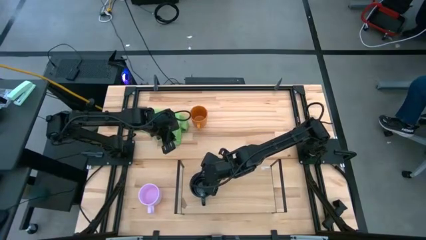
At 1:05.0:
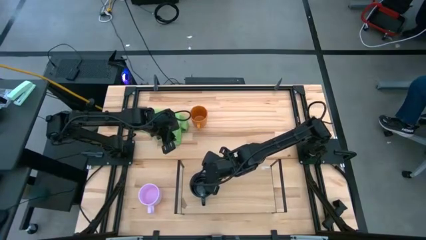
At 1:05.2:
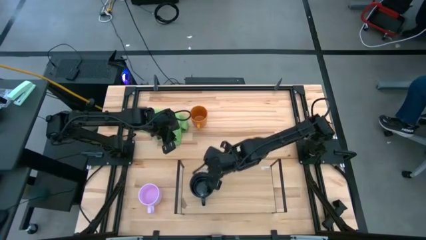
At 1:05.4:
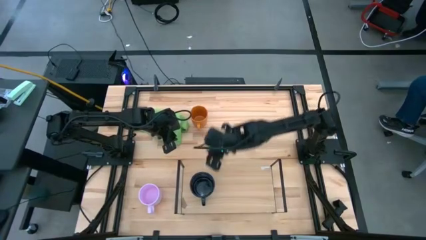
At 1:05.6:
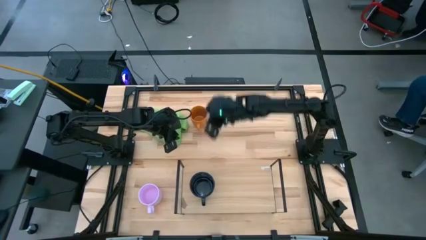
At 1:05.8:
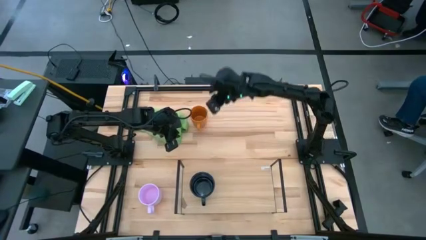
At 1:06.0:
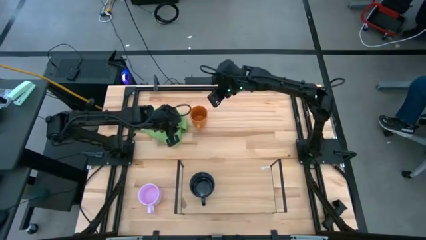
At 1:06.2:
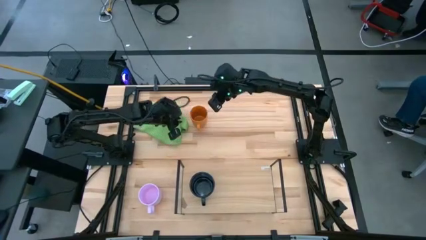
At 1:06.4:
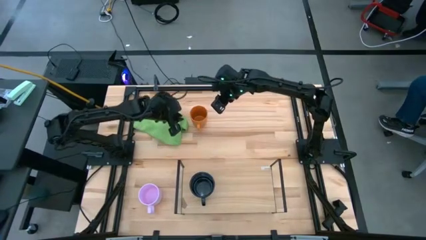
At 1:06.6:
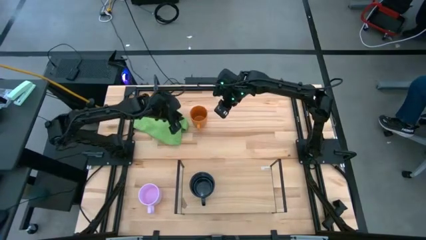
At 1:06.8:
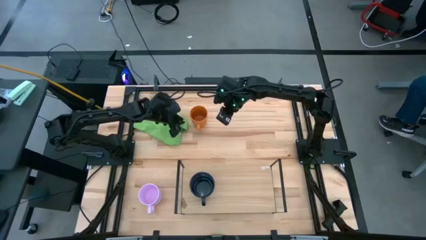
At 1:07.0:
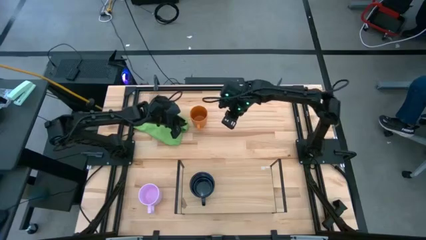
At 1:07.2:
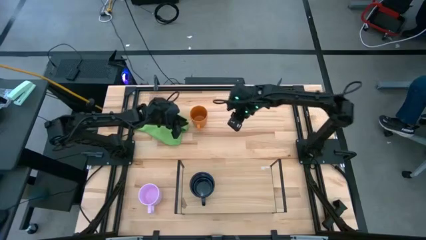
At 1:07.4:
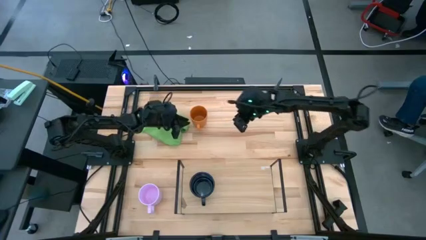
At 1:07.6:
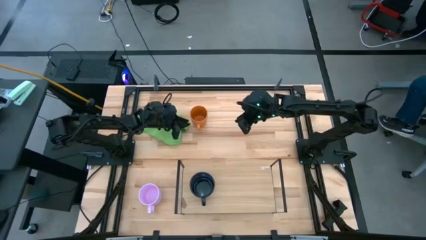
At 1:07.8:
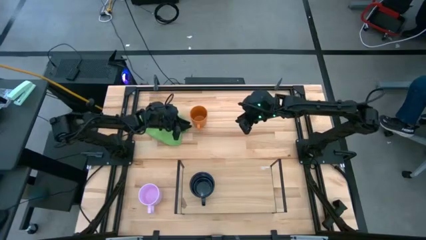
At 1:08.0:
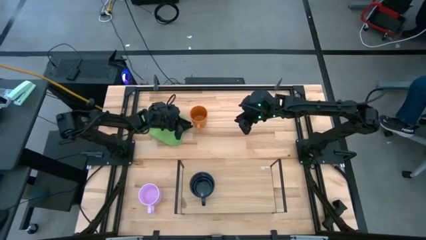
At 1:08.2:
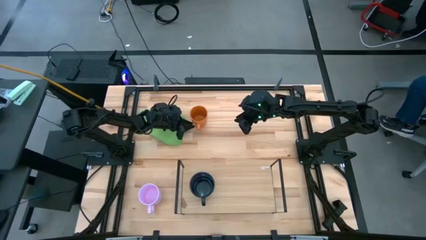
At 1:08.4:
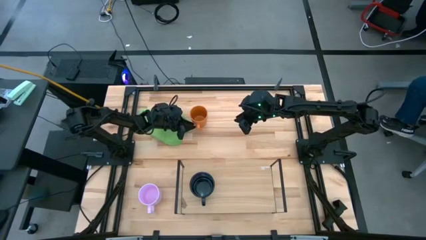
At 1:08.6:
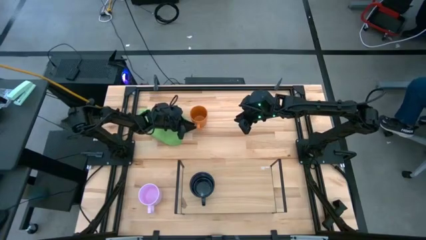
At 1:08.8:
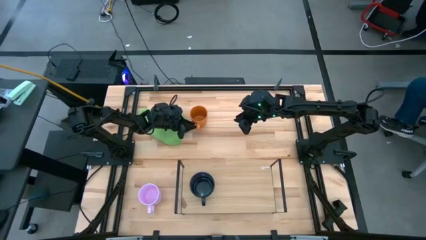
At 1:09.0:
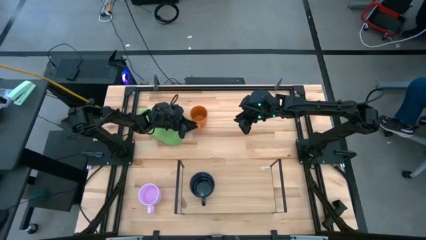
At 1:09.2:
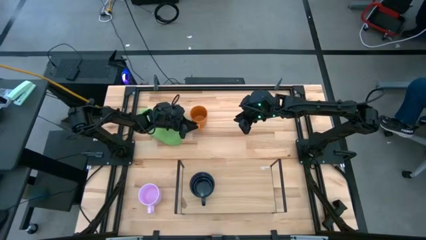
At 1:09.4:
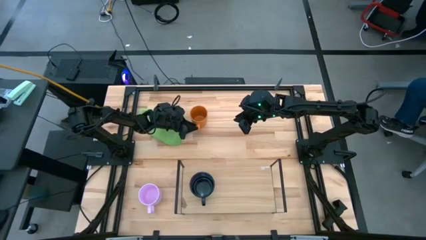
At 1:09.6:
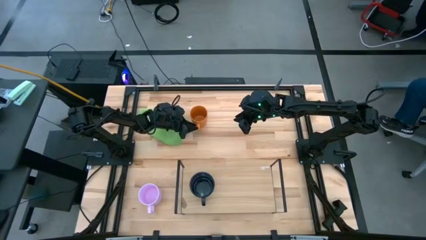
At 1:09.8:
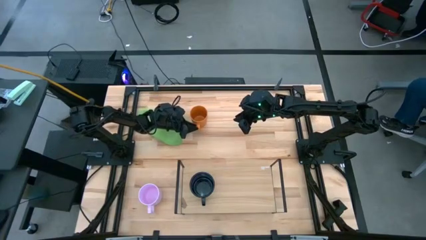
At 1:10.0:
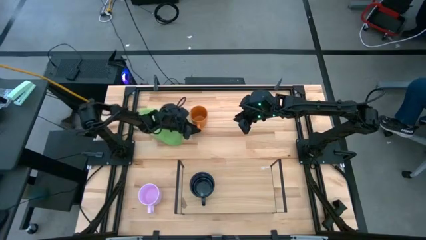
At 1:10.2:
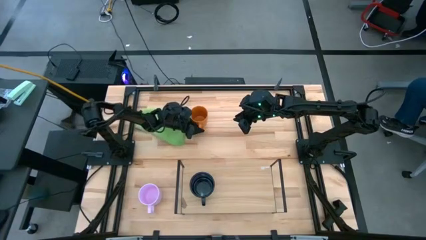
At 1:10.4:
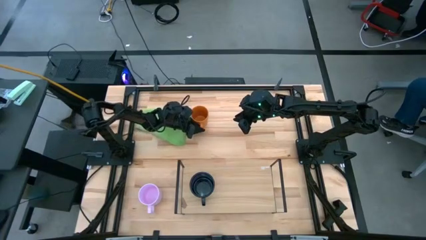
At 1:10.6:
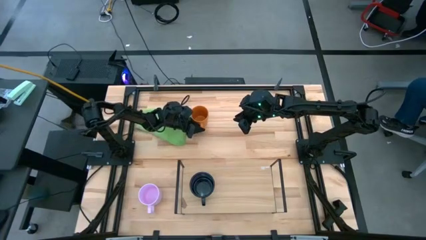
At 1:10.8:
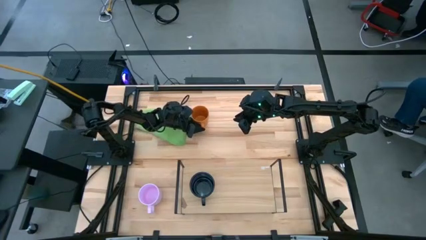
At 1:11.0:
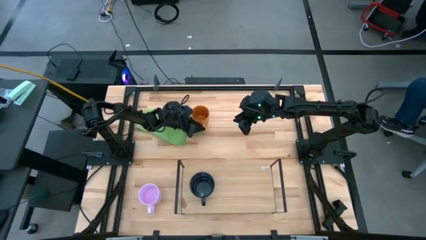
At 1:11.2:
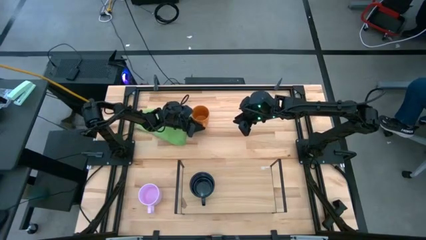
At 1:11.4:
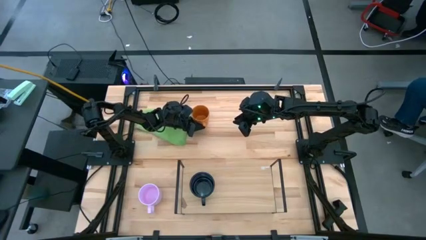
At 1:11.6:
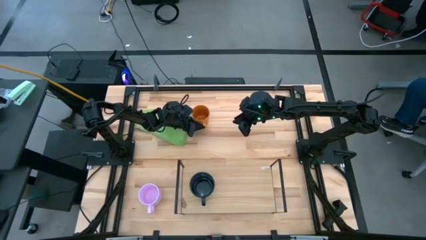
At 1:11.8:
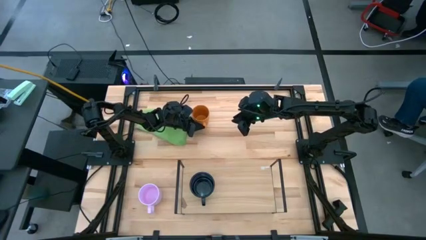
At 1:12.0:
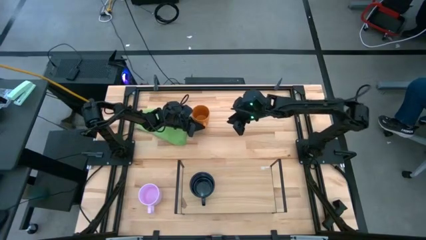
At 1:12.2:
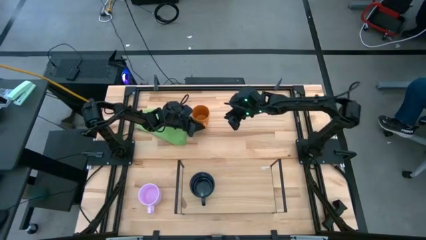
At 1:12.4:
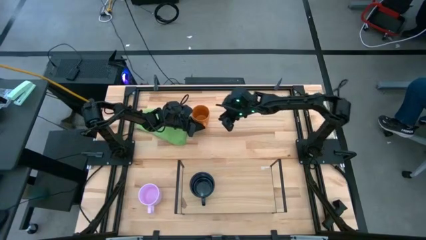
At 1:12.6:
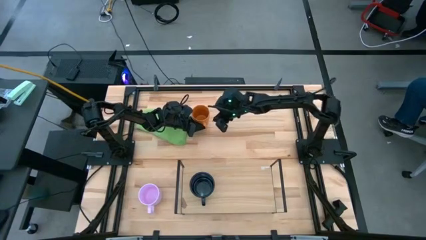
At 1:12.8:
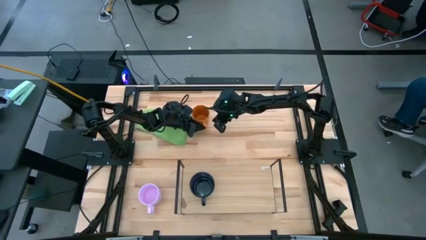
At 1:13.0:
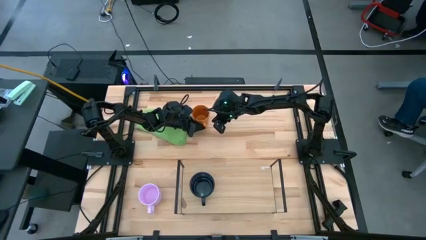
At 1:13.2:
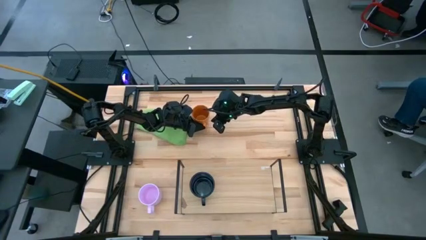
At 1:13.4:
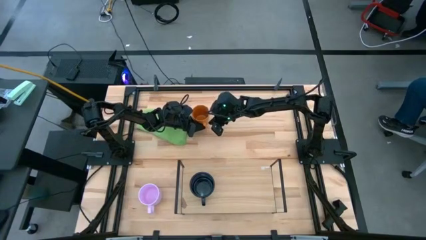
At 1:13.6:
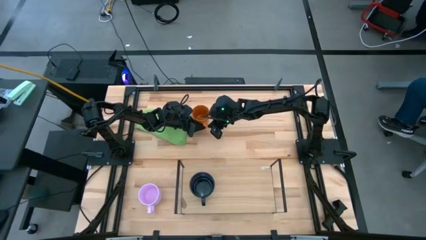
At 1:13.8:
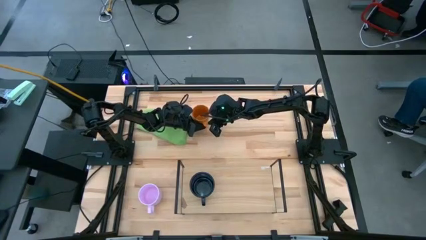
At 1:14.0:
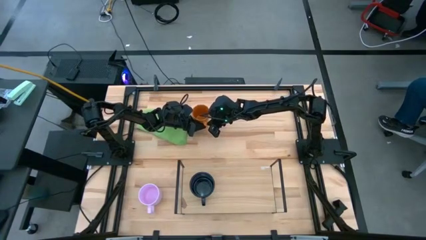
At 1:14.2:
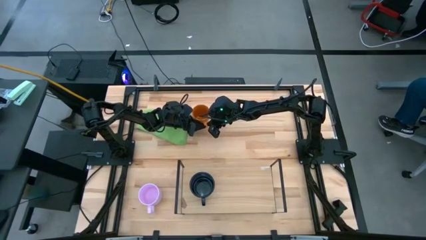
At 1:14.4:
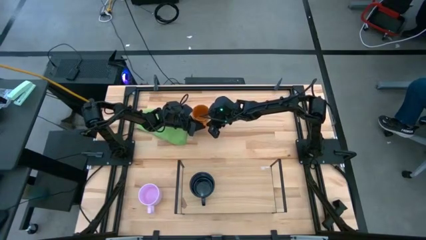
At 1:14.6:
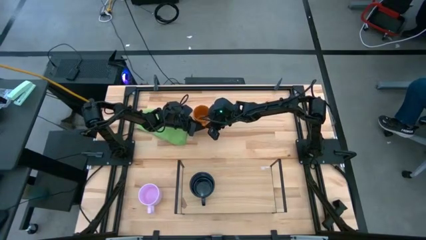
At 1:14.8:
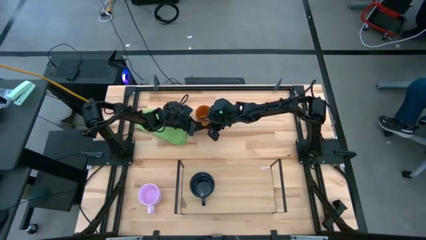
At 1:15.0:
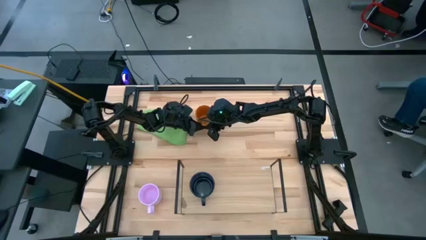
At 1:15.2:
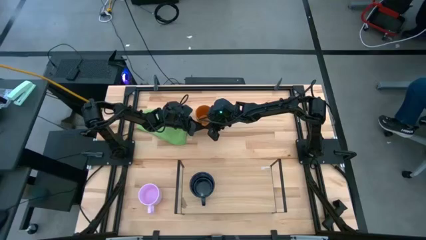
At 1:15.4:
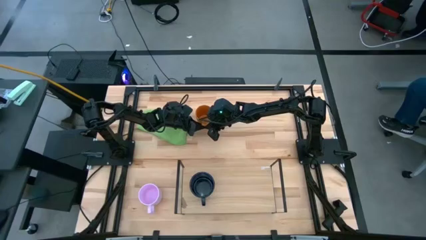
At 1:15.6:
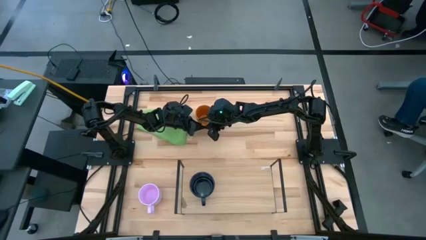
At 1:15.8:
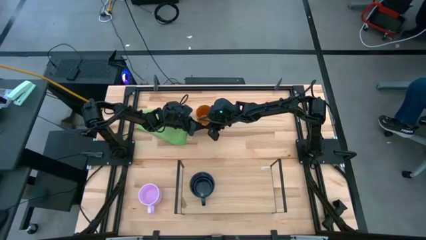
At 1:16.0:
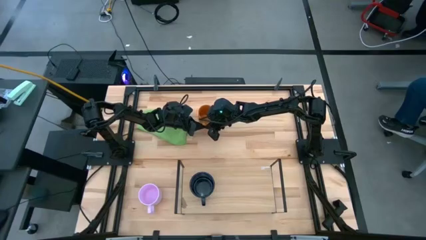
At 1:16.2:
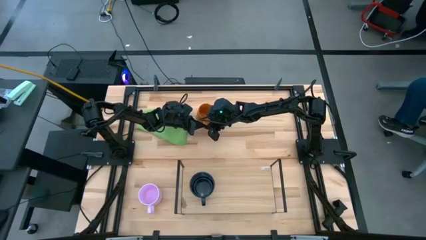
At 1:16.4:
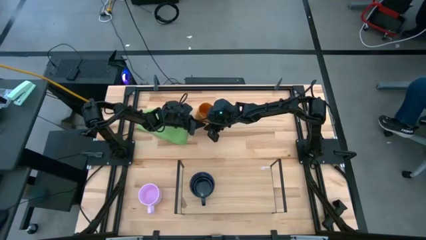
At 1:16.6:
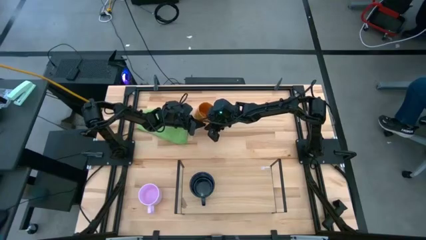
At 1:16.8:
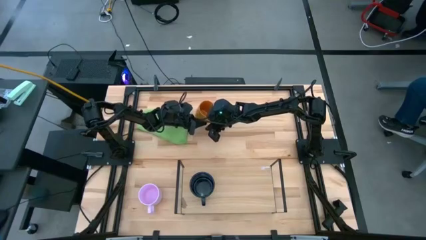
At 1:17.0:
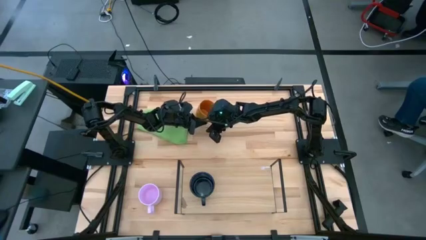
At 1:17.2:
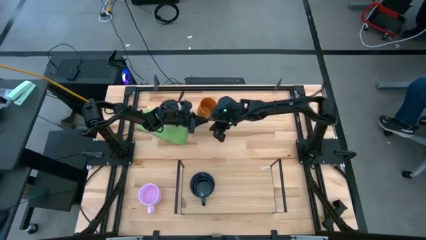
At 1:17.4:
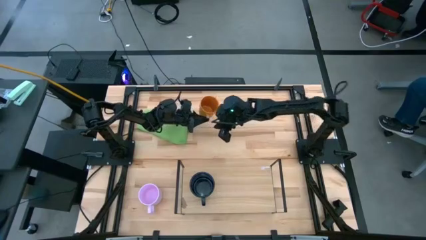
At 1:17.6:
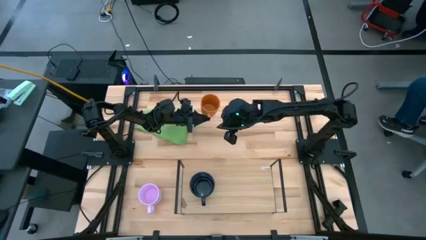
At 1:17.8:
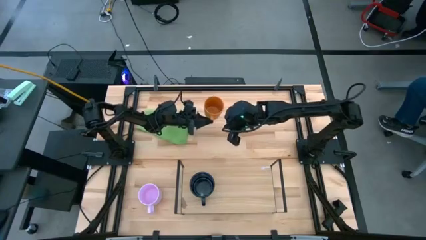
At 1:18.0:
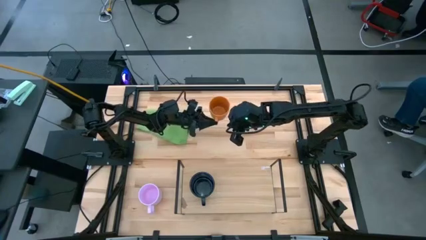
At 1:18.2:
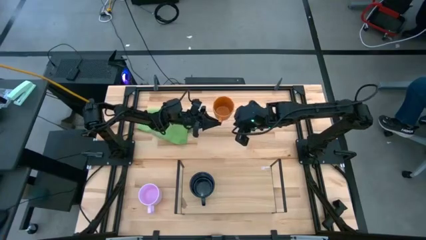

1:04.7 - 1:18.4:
Task: Stack small to large cups/mugs on shelf
Put the orange mug on the shelf
